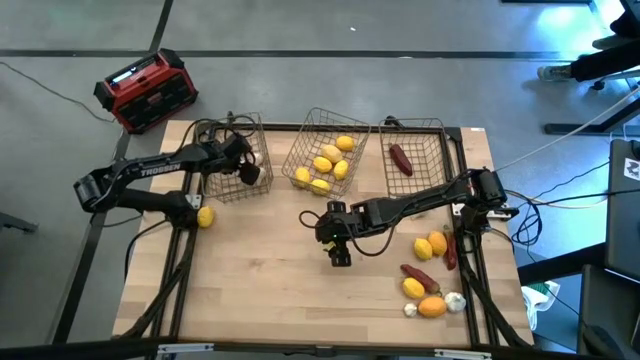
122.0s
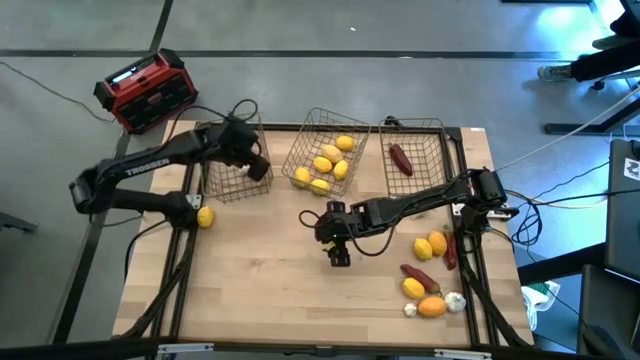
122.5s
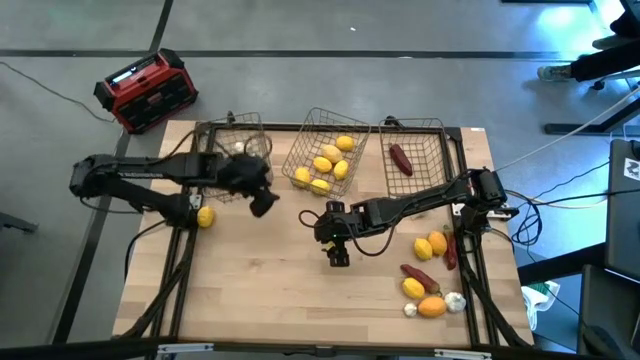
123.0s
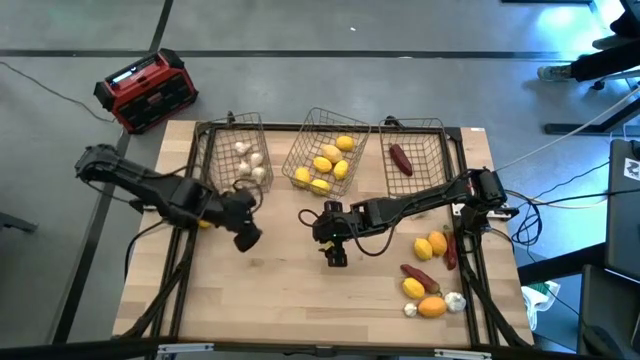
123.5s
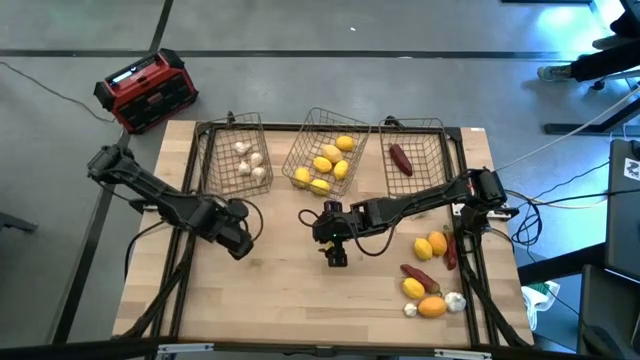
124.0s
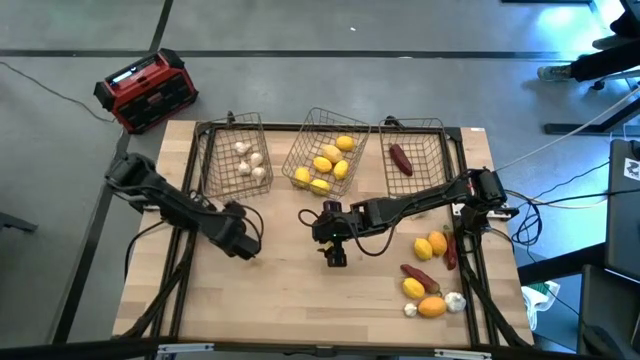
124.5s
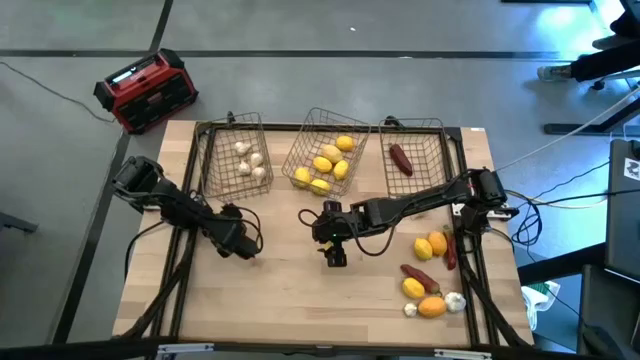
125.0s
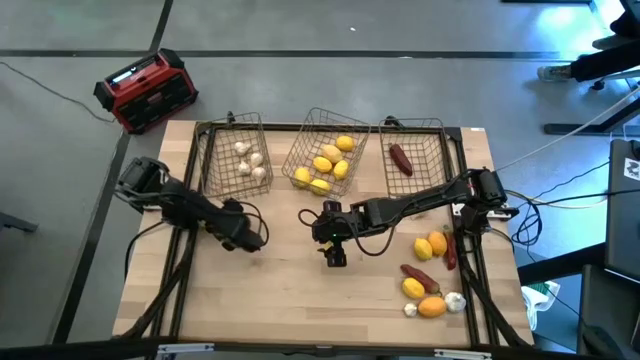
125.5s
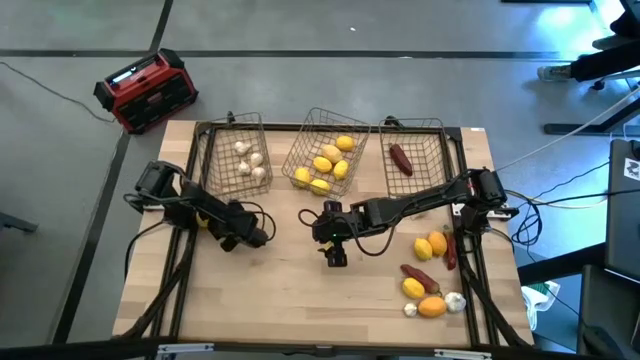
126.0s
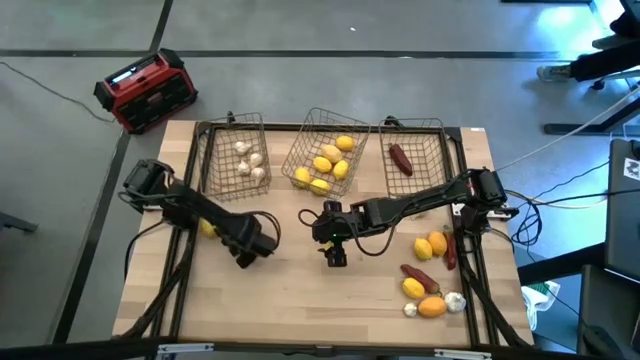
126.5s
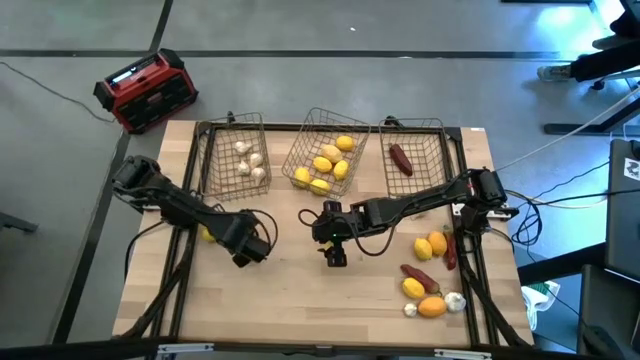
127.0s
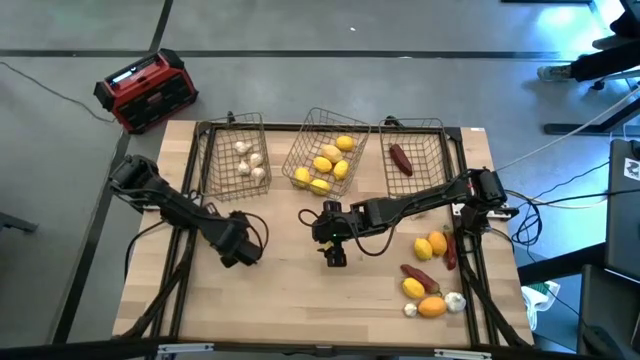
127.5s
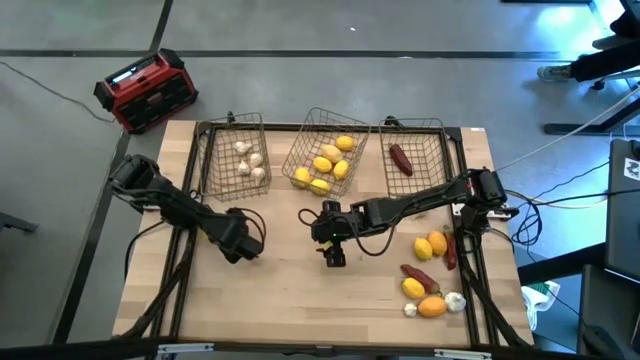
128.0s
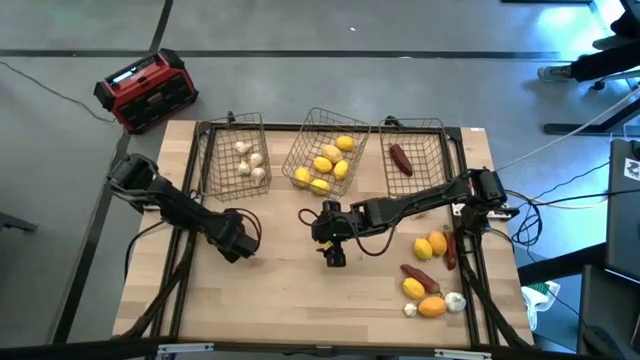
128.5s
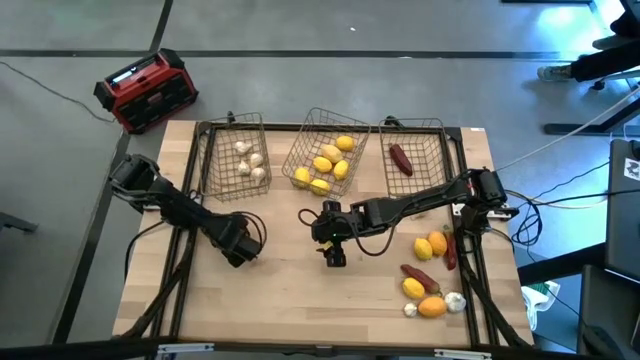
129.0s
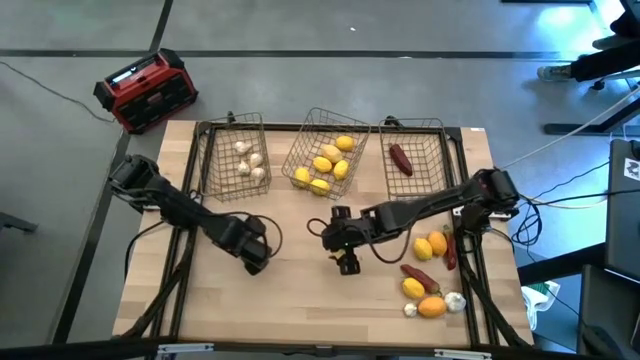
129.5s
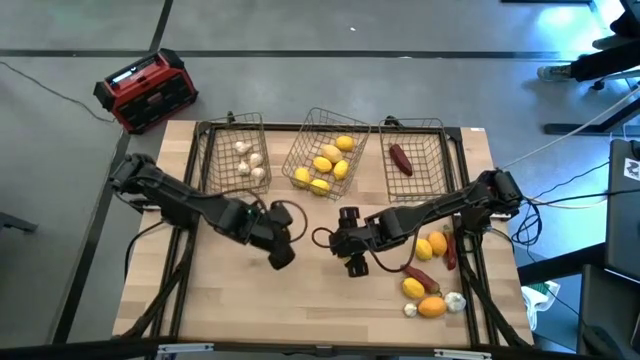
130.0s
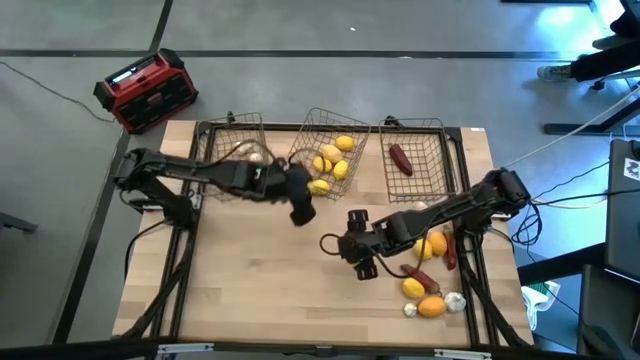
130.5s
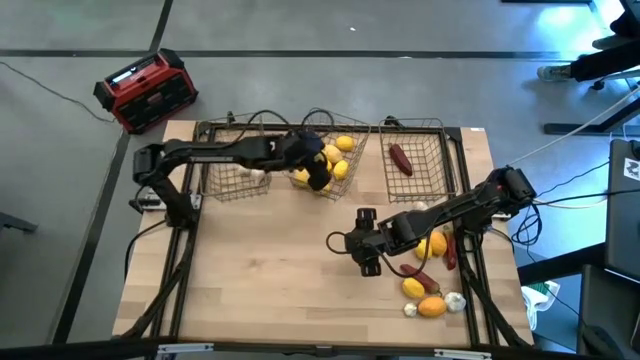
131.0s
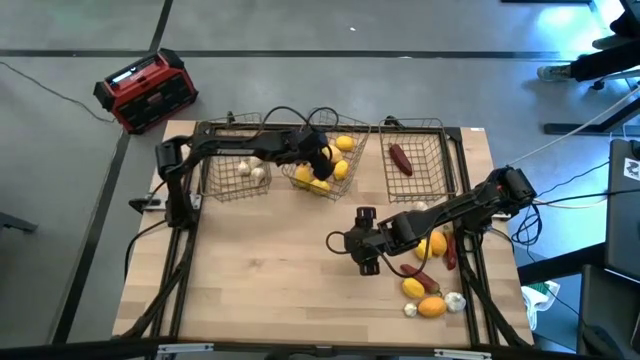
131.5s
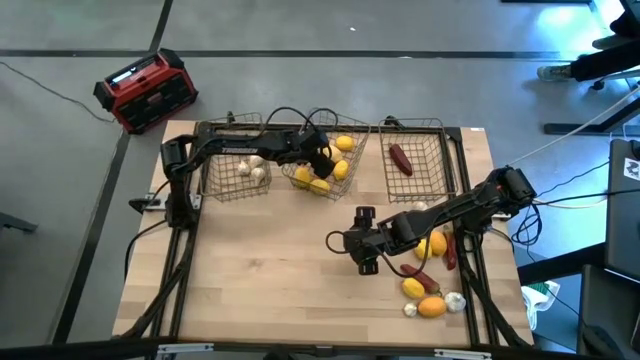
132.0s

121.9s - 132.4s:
Task: Sort produce into baskets
Put the lemon into the middle wire basket

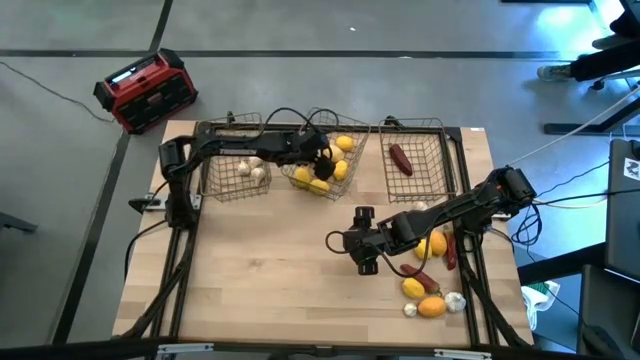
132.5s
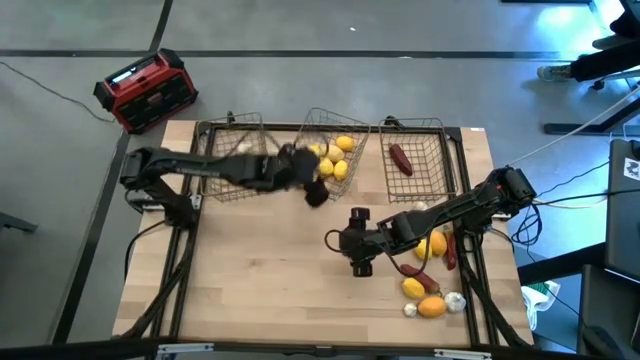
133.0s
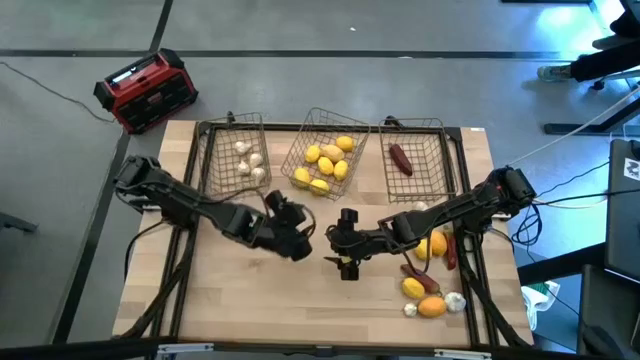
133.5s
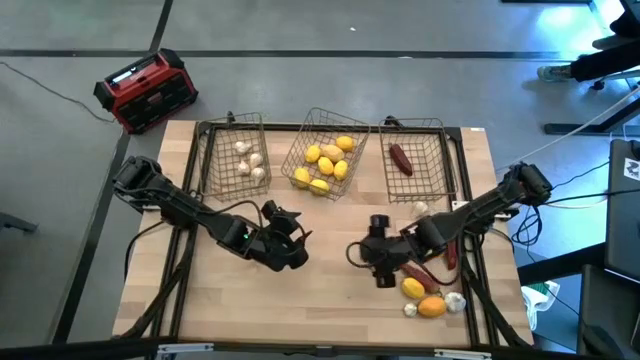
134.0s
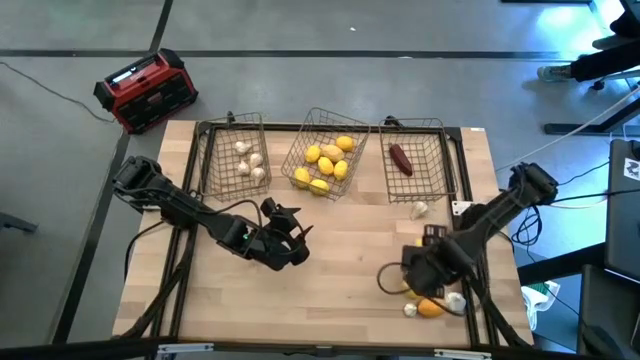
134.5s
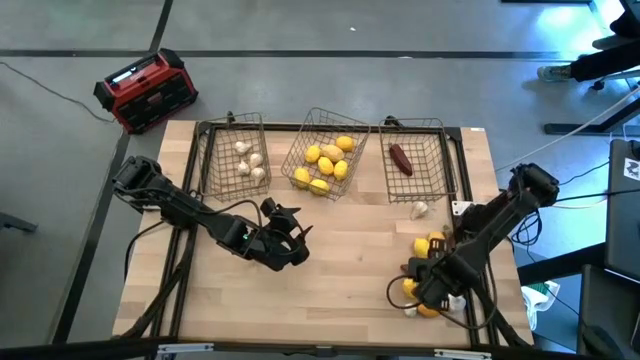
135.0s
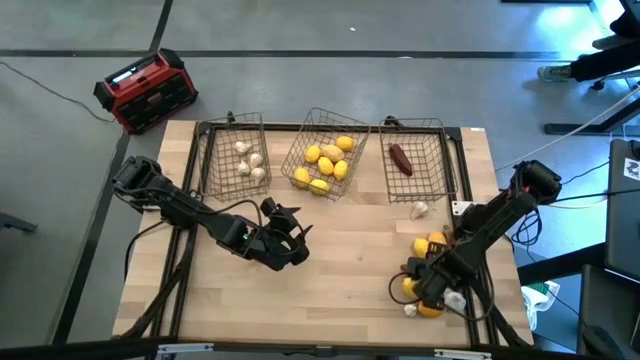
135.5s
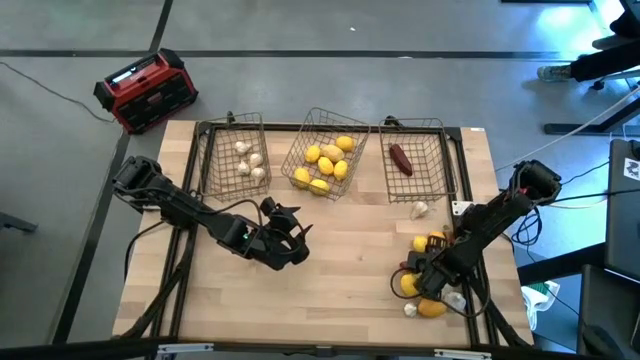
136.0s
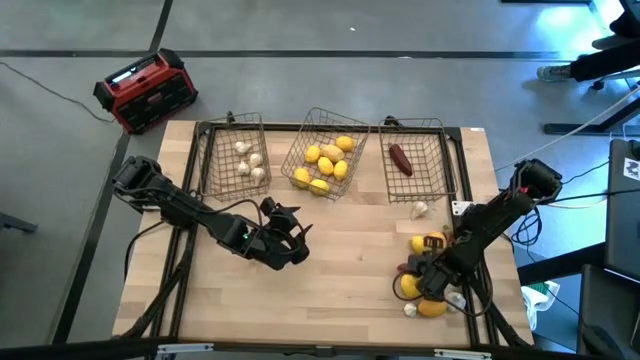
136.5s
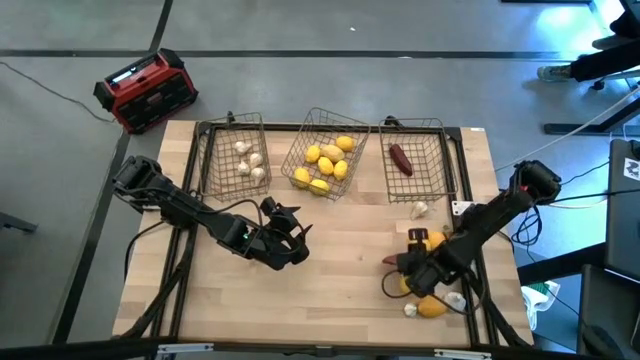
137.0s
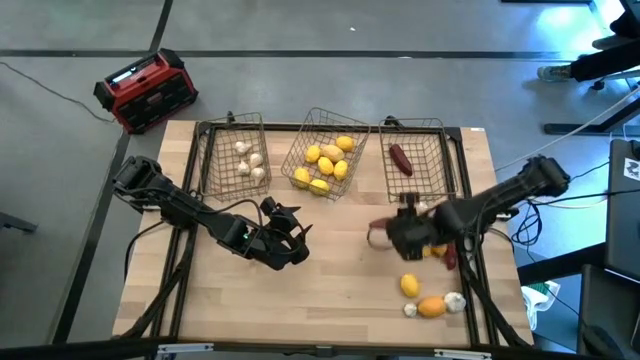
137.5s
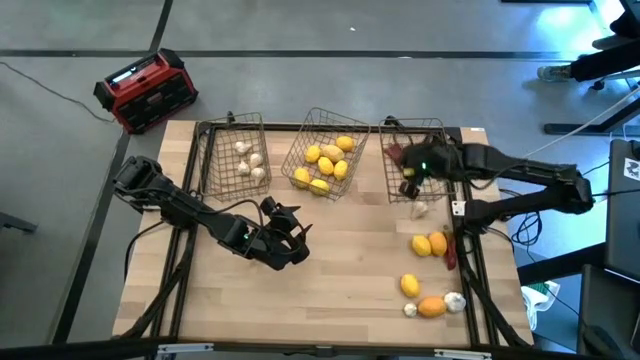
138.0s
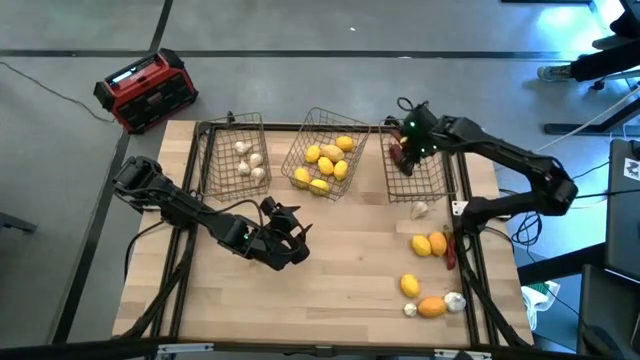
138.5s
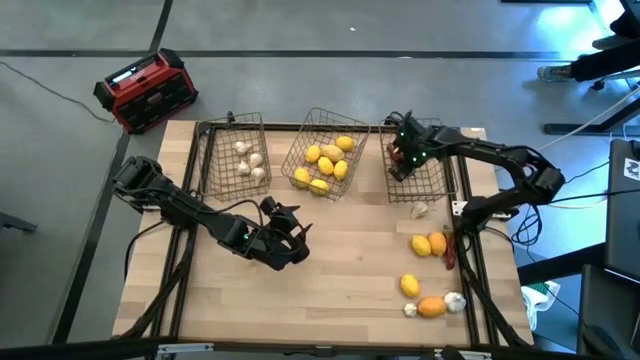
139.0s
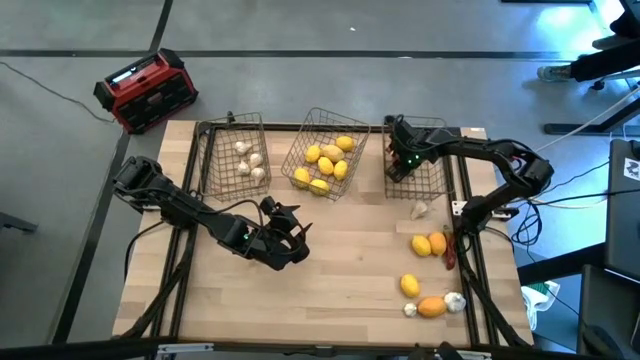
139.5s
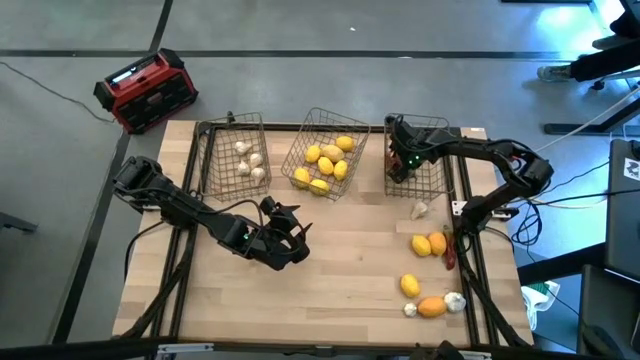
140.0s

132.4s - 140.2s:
Put the bell pepper into the right wire basket
